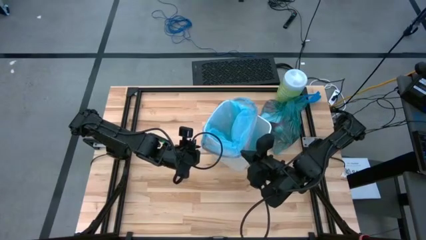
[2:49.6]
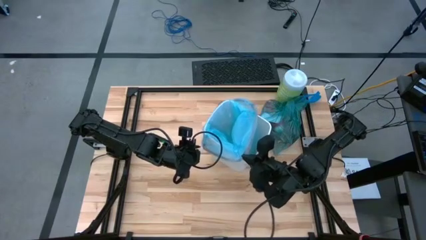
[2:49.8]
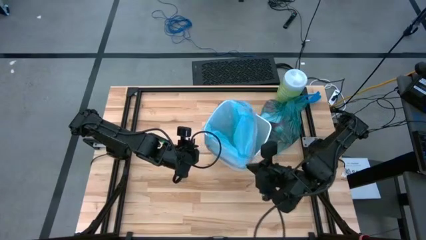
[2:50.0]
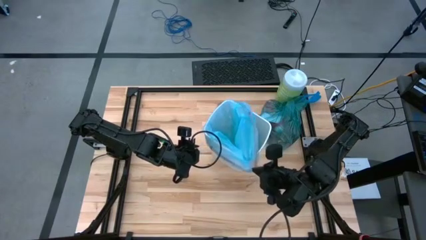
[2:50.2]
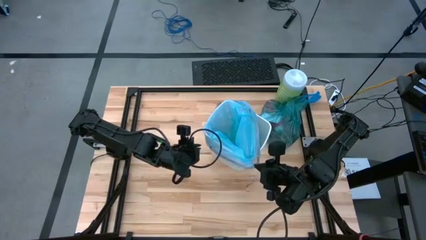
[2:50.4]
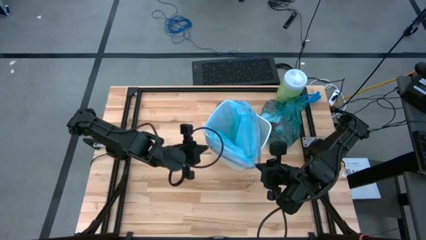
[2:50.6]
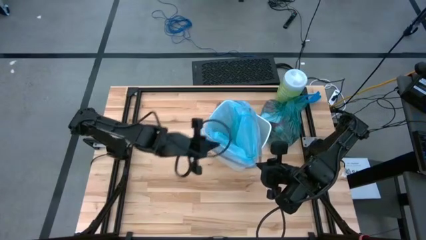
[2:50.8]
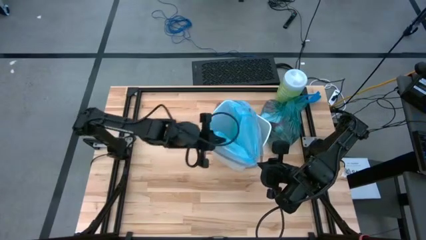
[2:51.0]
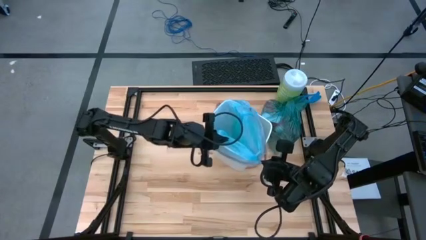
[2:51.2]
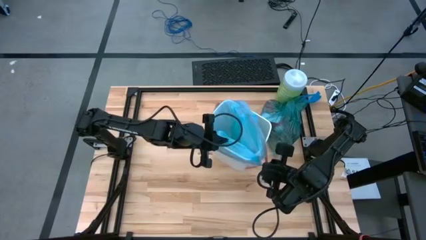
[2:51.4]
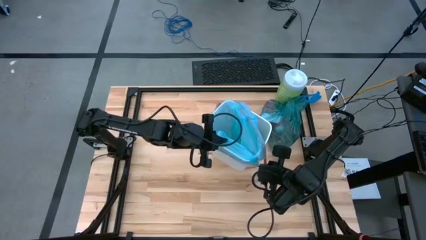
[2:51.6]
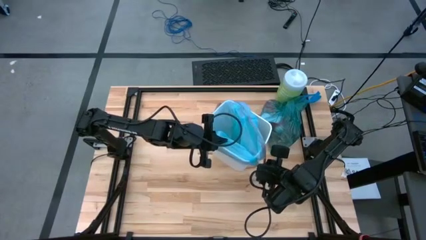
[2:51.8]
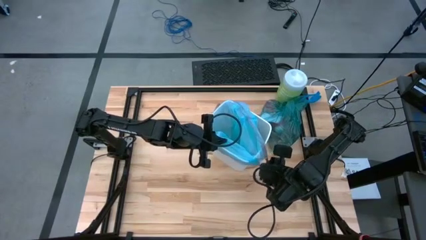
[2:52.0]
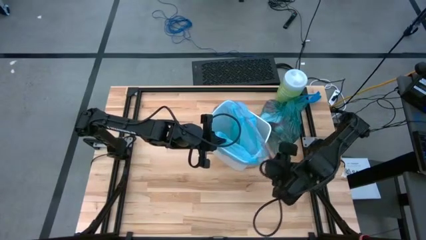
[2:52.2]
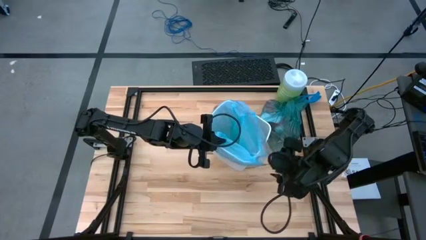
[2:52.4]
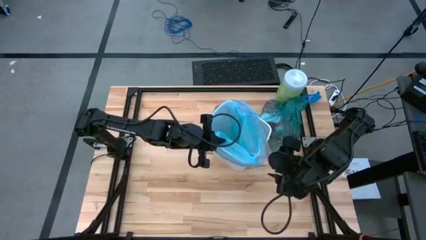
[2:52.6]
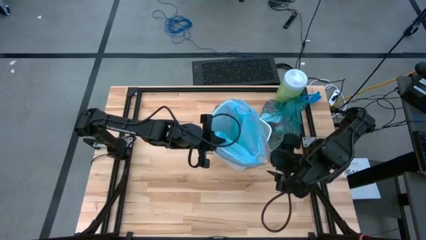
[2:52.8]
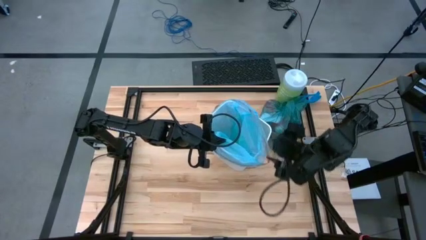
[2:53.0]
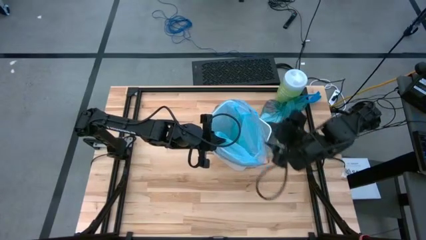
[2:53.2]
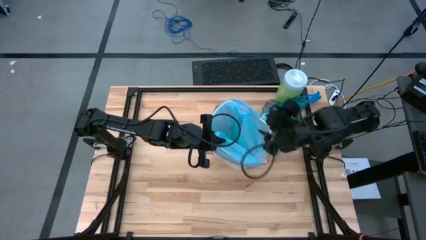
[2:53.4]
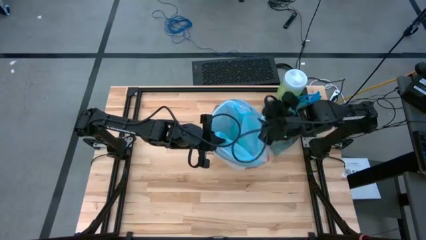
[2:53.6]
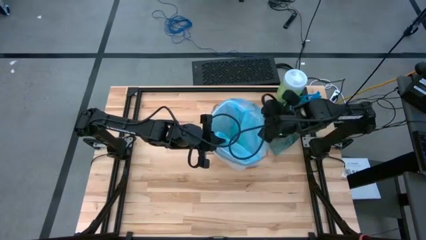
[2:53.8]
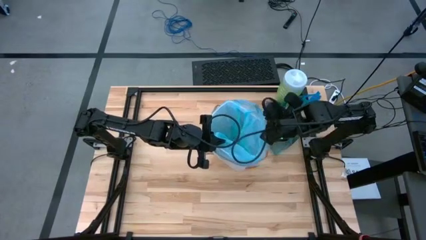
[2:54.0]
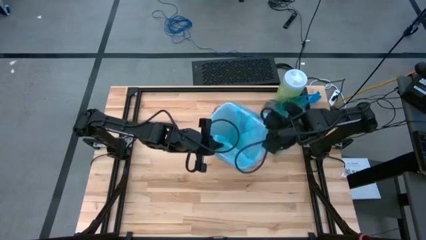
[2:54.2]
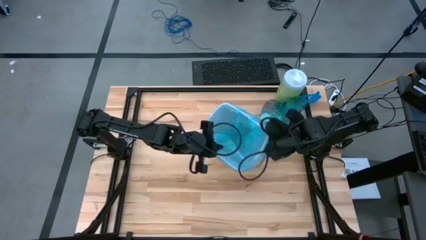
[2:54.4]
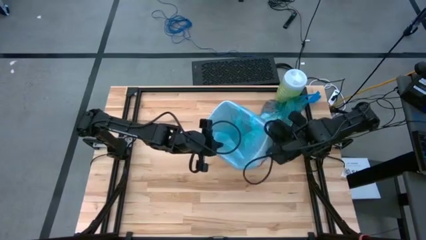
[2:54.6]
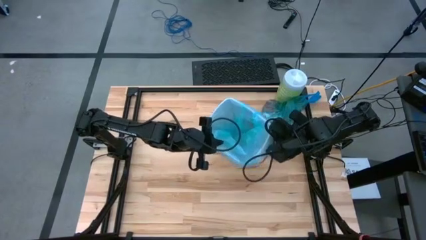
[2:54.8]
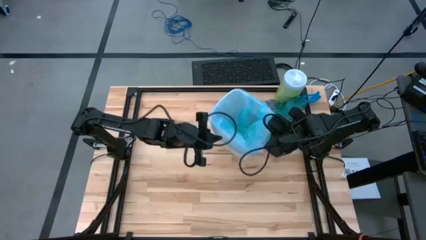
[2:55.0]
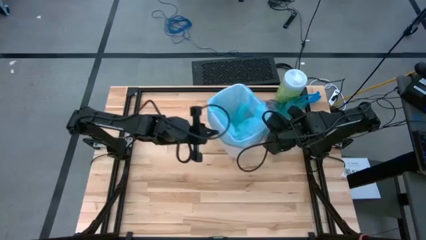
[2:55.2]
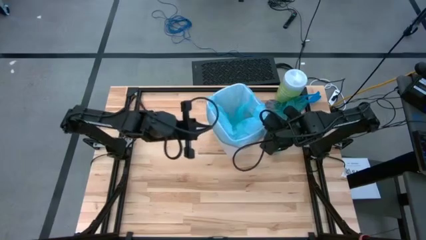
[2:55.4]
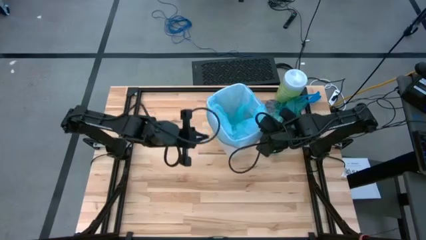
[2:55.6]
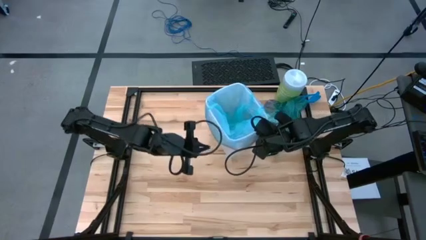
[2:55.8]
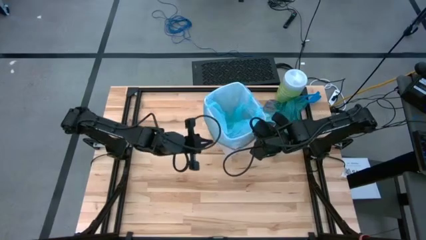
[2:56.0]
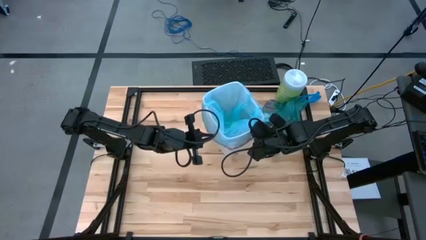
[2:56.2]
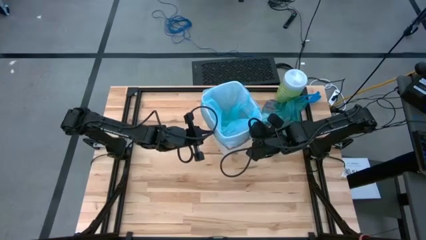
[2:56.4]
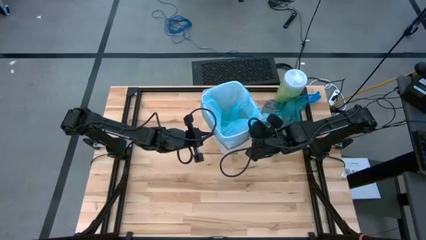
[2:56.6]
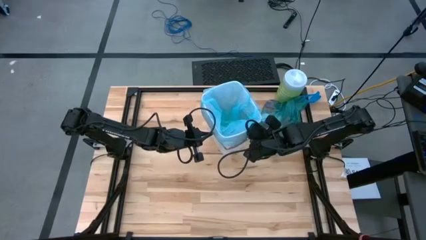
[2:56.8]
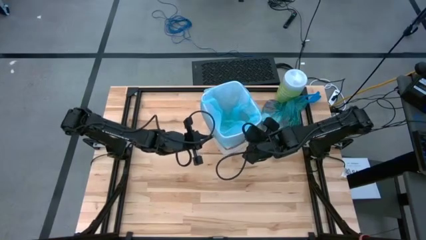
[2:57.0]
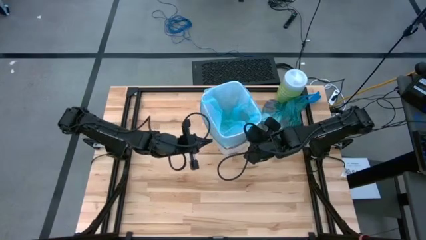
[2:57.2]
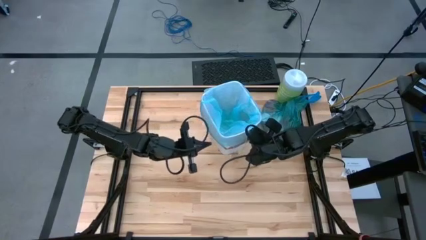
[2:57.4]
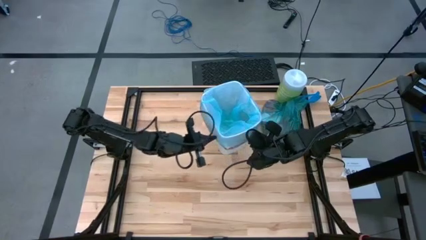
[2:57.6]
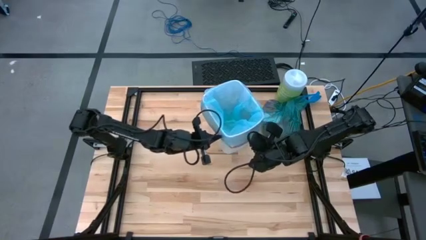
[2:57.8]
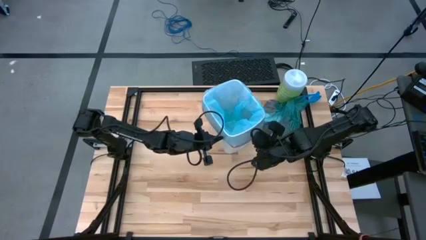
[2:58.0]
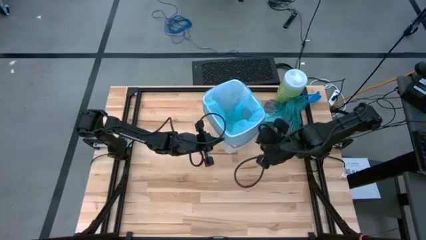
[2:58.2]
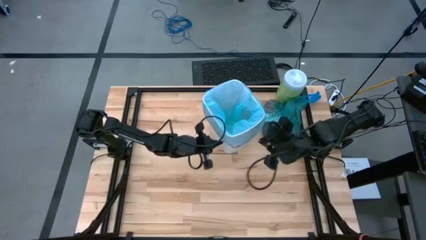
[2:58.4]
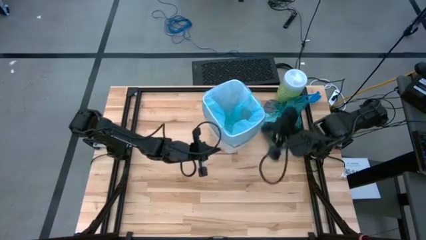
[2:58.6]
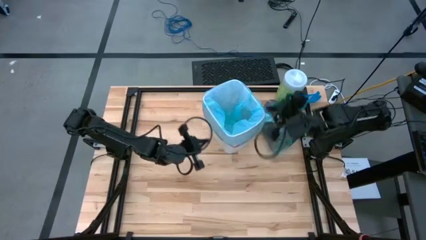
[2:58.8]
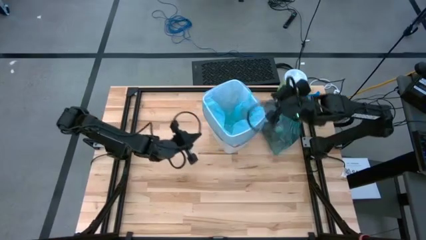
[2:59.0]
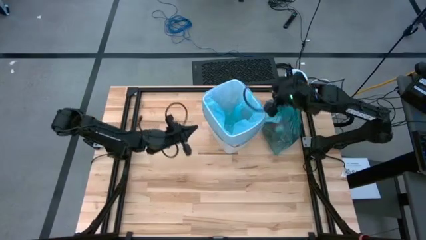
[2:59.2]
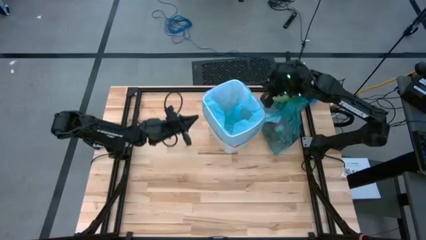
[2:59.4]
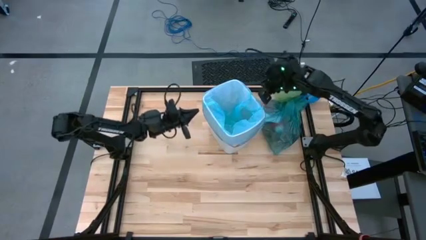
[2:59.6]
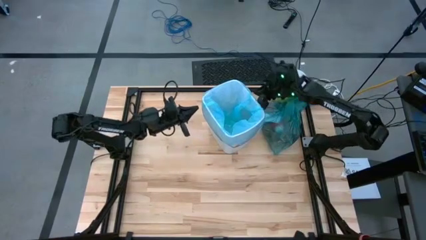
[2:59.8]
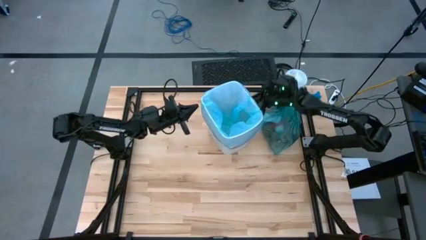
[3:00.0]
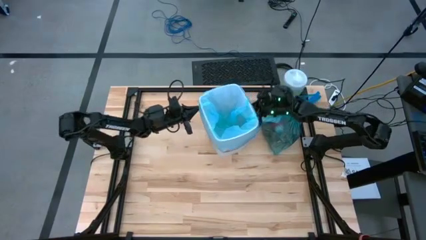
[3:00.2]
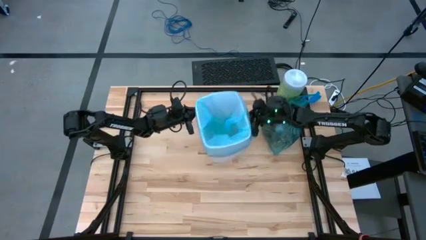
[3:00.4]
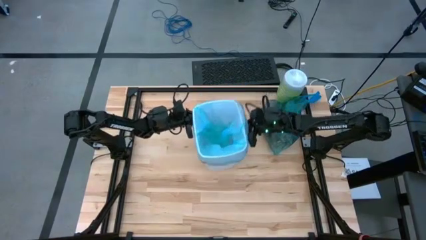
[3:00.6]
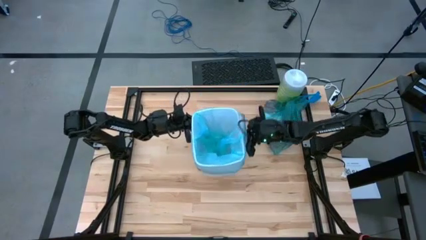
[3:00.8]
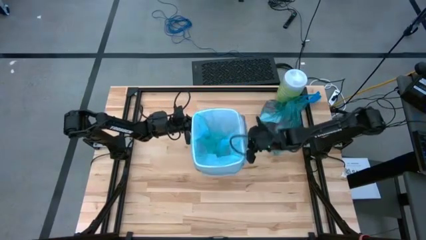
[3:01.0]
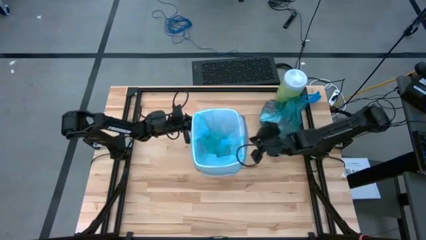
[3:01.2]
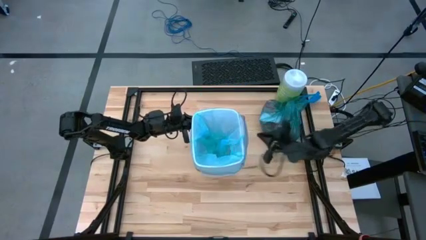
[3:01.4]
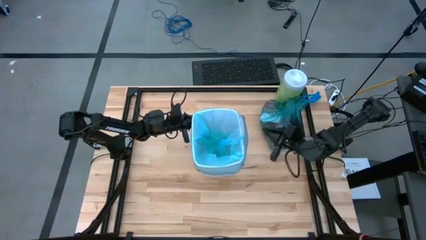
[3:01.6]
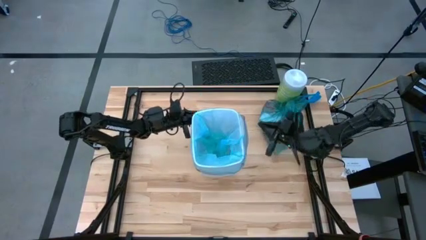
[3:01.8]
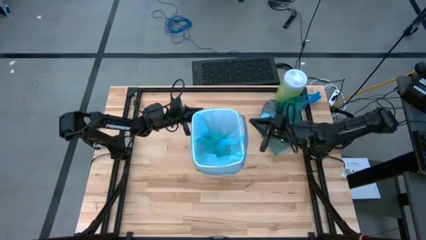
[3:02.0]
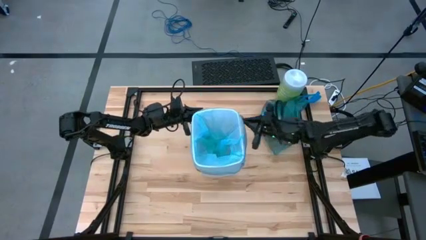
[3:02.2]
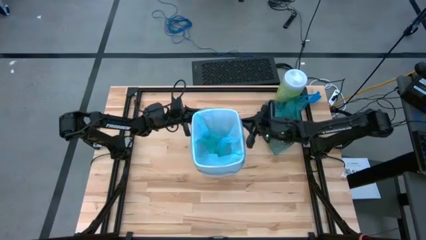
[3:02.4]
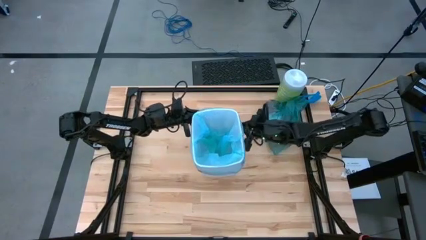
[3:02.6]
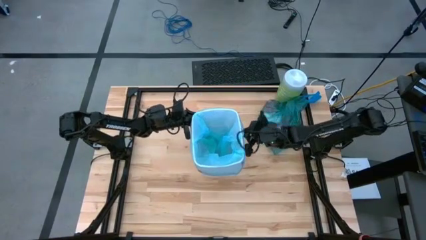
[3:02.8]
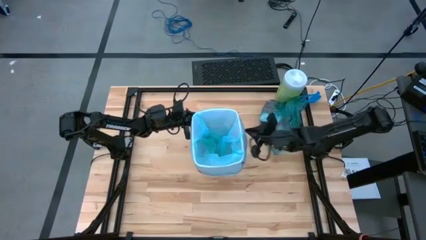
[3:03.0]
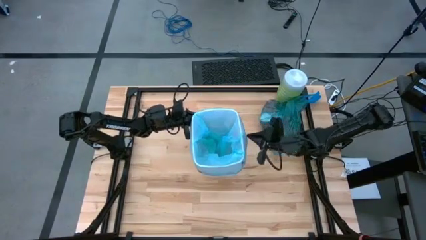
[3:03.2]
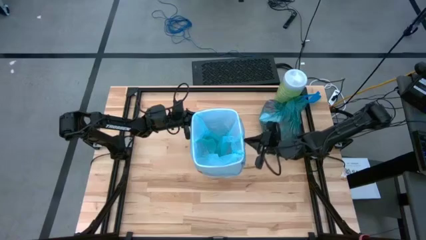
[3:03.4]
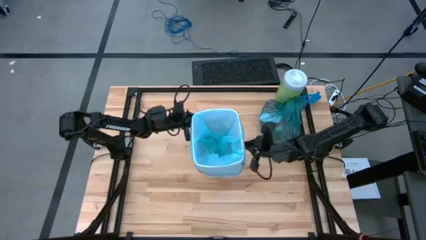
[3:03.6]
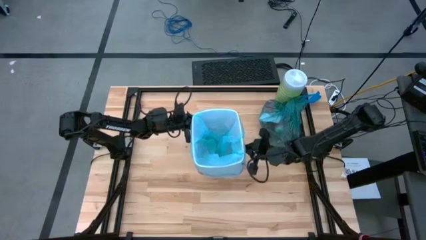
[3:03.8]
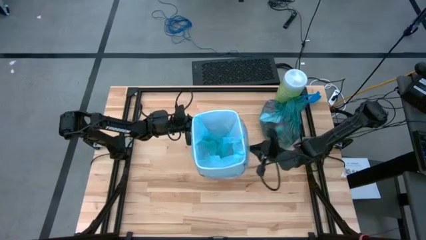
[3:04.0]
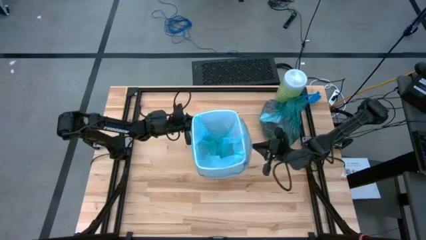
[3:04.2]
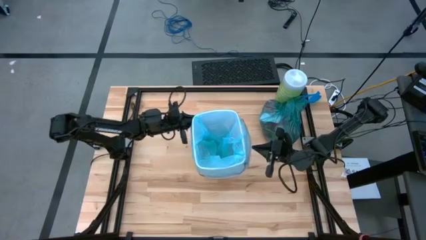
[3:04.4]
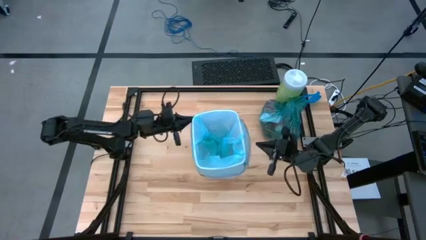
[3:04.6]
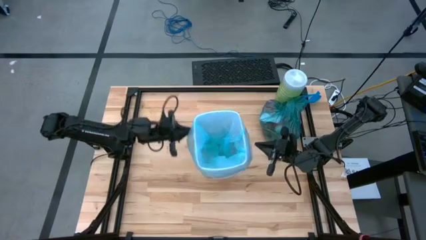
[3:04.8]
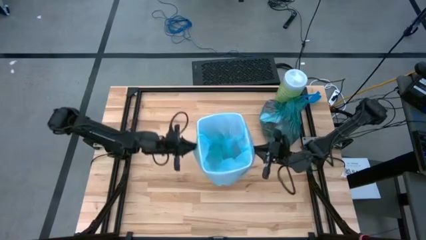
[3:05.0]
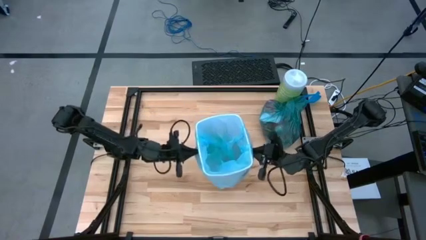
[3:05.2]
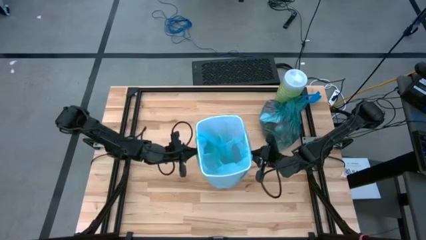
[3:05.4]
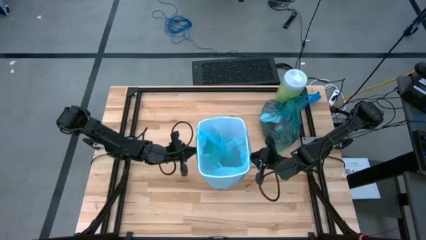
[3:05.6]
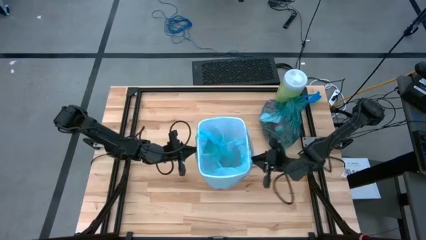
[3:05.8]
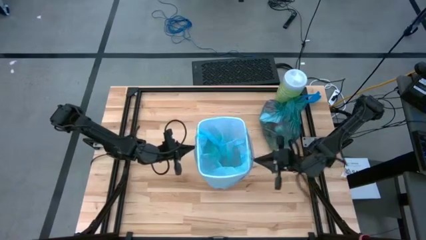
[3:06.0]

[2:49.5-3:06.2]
Task: place trash/remove bag and relplace
Put the new blue trash bag inside the white trash bin
